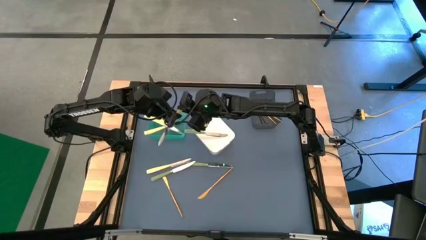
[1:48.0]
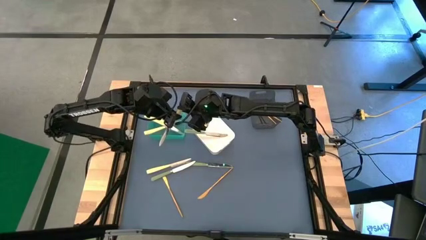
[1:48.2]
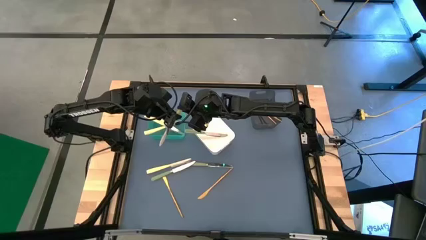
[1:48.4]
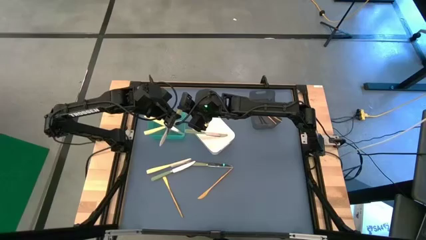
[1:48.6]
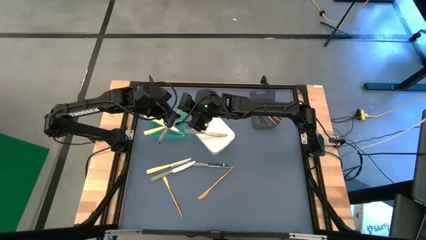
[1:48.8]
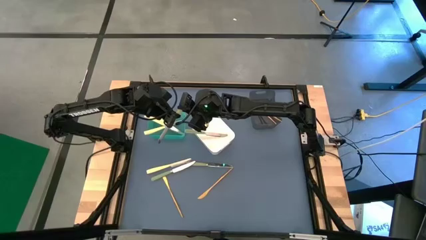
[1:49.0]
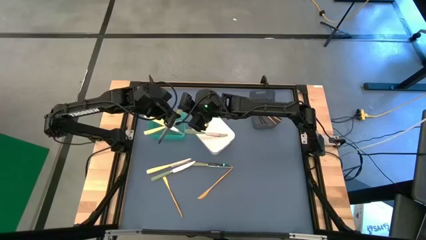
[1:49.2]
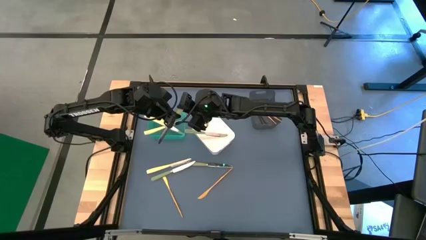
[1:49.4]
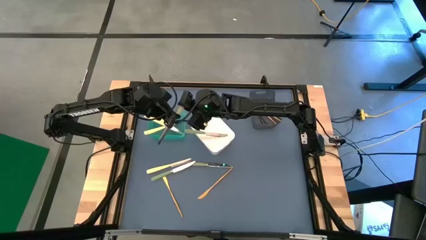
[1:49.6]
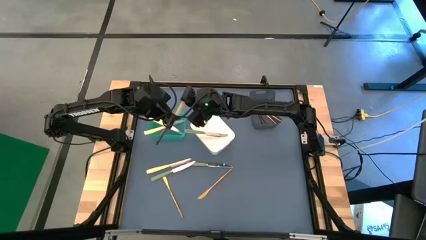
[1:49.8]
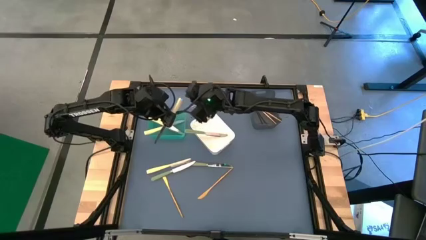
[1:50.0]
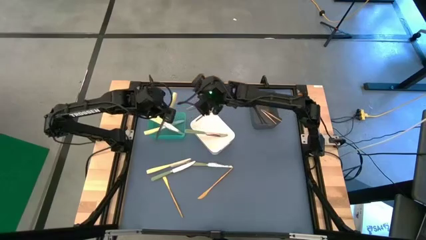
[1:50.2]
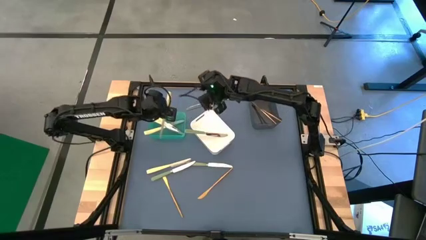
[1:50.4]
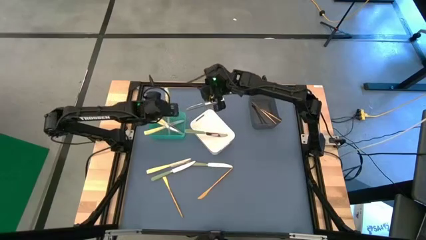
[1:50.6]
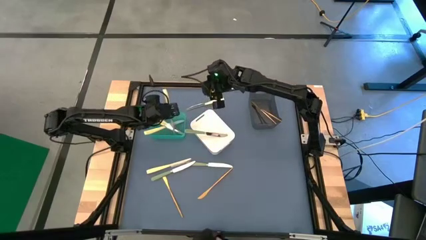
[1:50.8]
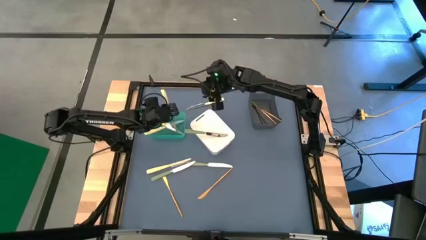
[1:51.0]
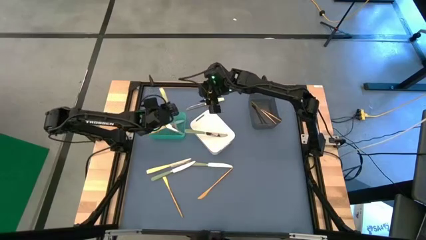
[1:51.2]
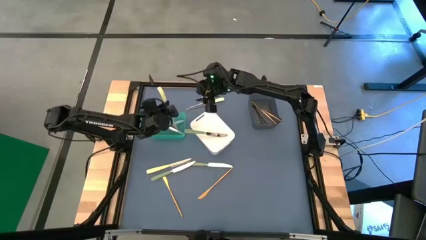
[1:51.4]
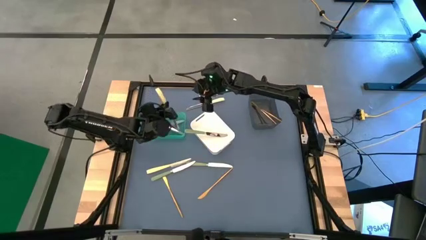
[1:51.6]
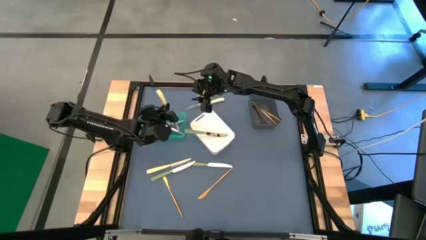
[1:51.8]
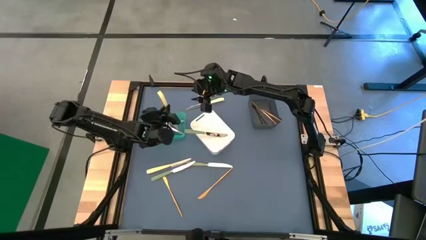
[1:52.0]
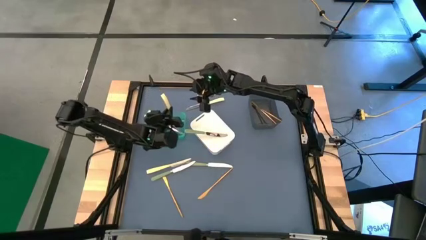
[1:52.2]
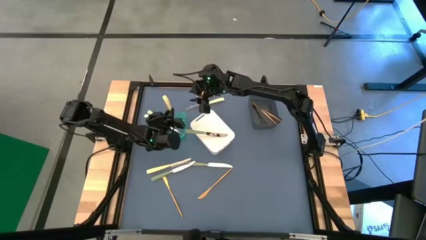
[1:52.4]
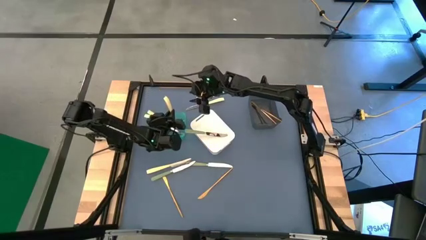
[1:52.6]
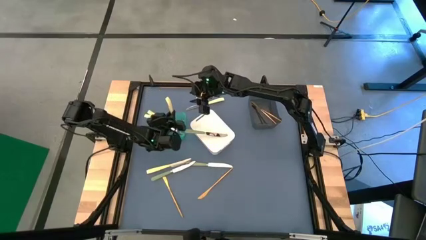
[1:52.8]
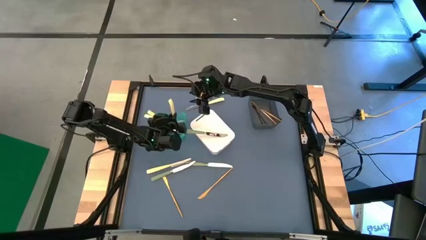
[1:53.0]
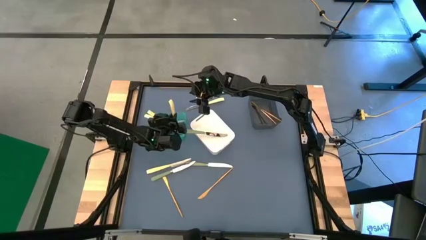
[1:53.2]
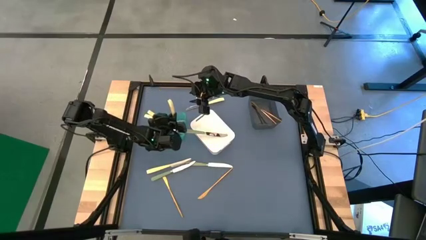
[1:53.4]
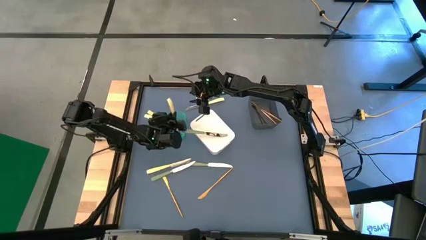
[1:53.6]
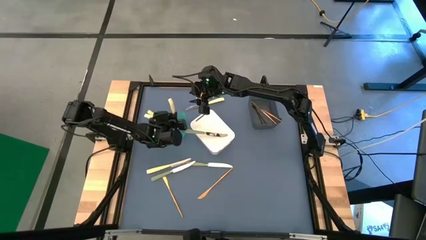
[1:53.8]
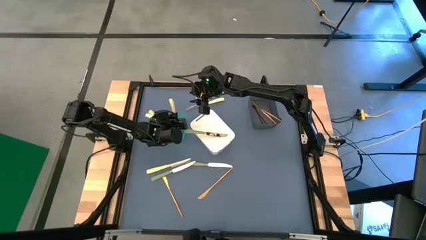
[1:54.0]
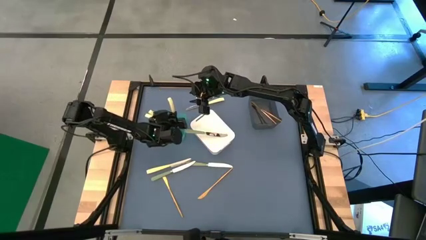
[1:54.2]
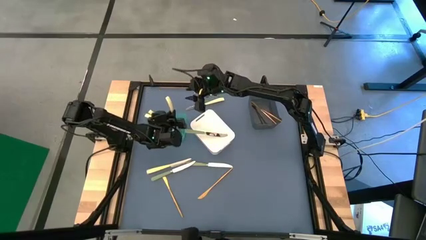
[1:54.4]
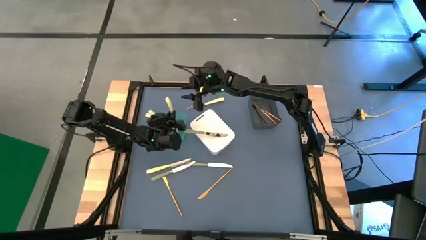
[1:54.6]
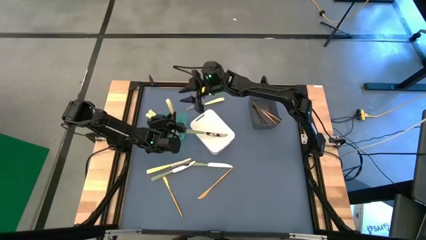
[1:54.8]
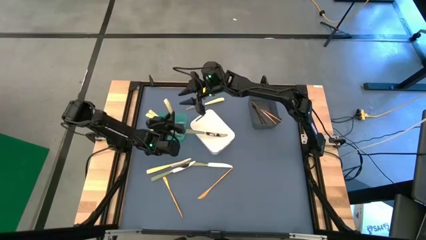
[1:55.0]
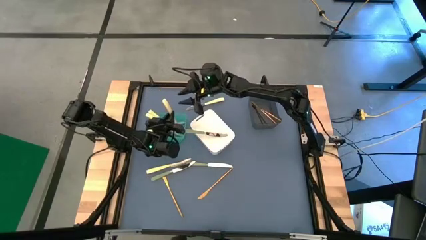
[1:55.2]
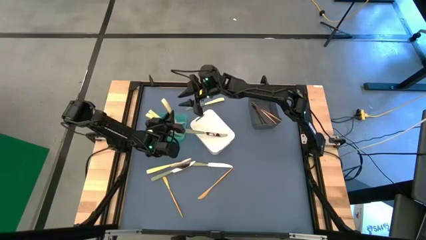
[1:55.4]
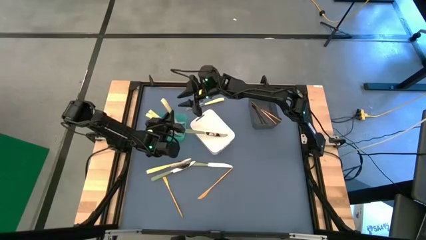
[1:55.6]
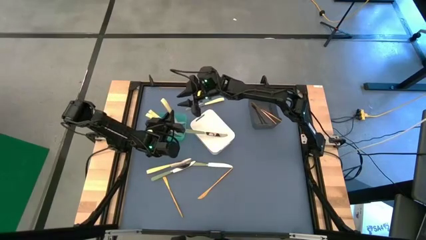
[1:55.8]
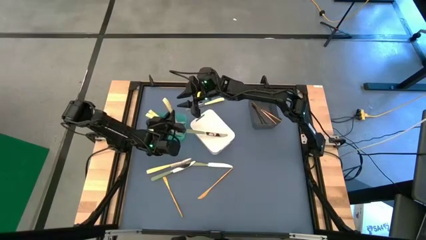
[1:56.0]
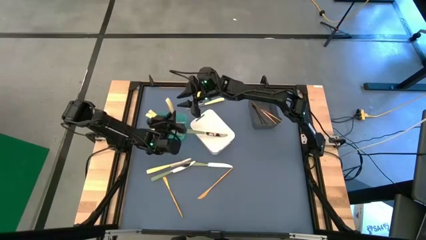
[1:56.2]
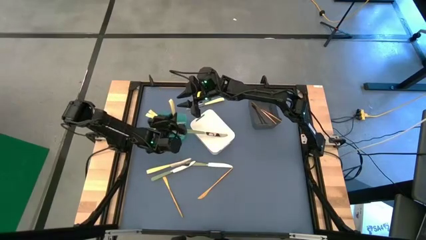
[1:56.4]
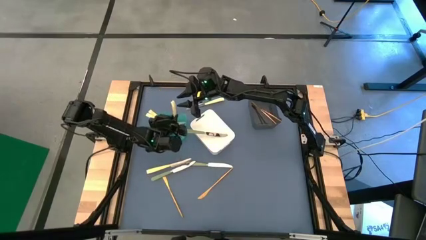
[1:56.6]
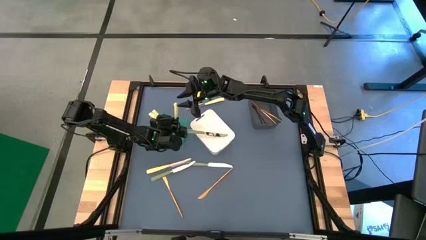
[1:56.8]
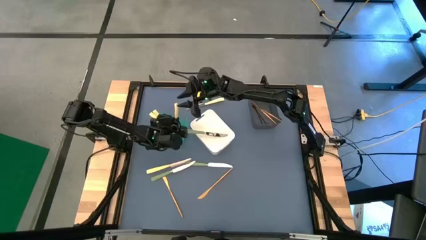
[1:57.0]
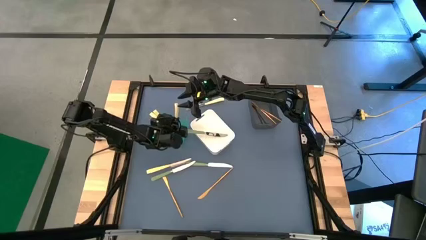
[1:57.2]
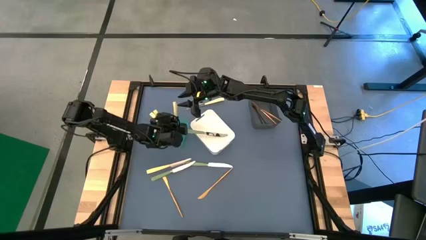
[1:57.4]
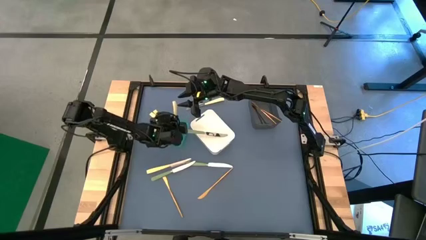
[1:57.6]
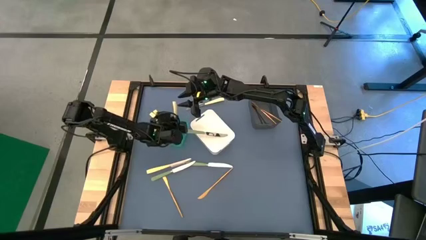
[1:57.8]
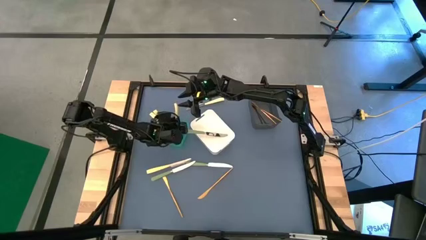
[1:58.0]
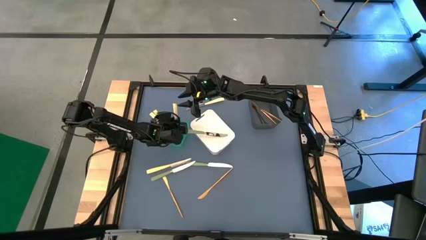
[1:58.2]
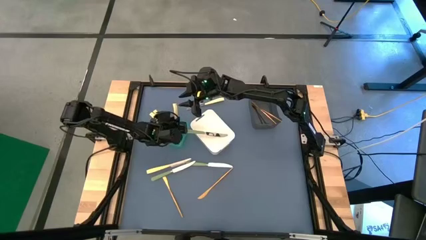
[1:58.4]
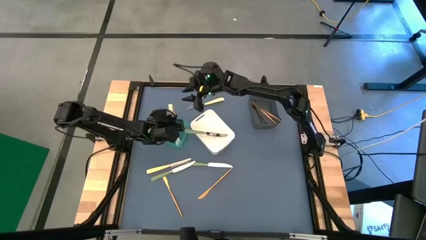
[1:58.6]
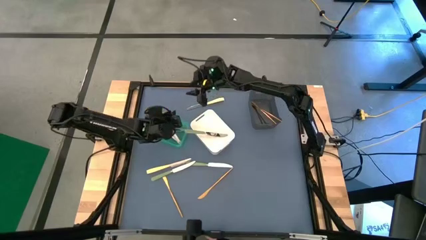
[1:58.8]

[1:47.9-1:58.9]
Task: Sort silverware by color (type)
Put the top yellow table knife into the green bin
